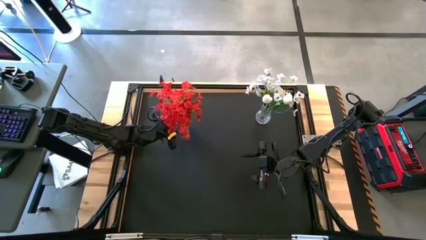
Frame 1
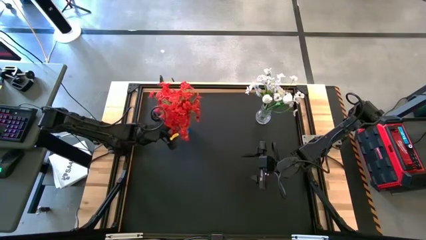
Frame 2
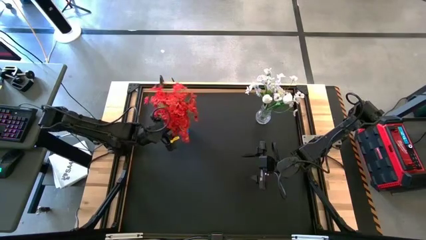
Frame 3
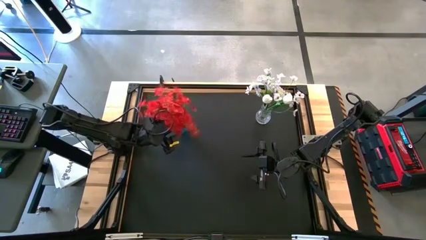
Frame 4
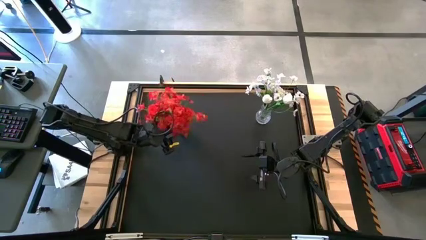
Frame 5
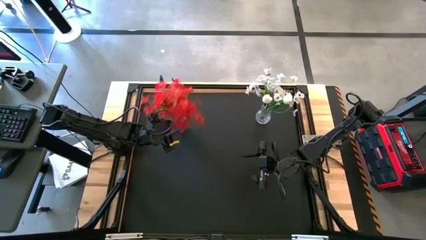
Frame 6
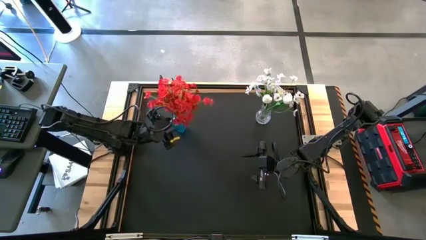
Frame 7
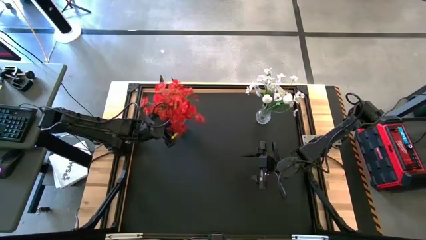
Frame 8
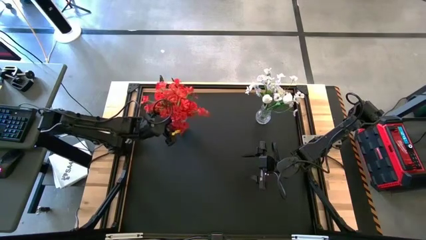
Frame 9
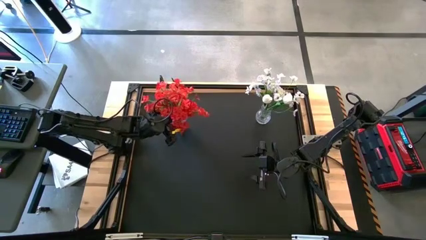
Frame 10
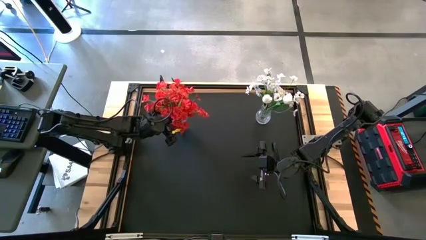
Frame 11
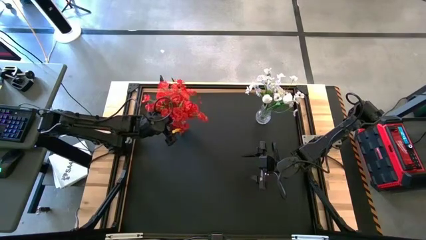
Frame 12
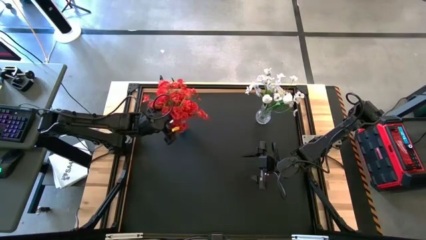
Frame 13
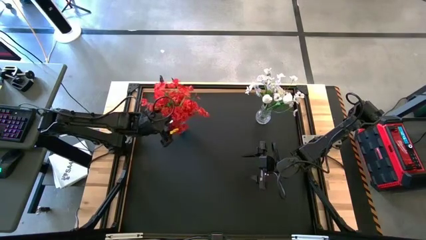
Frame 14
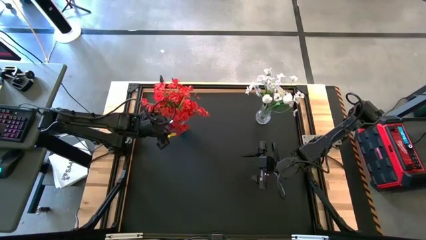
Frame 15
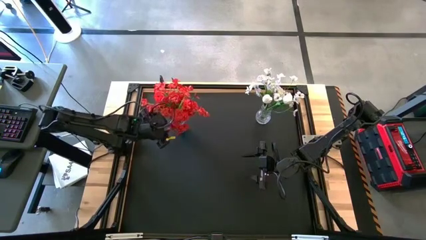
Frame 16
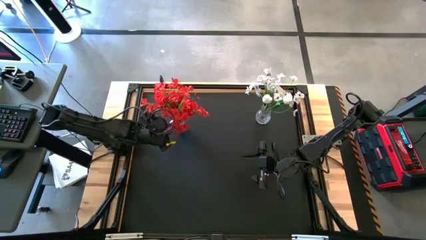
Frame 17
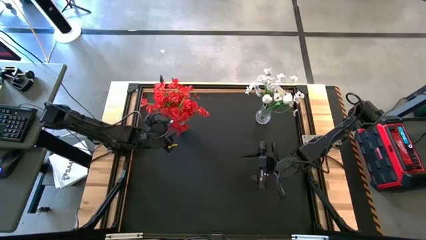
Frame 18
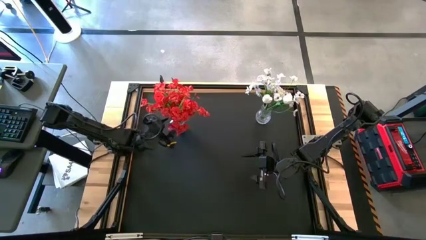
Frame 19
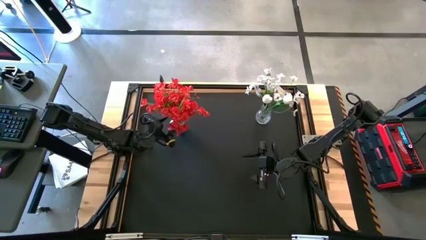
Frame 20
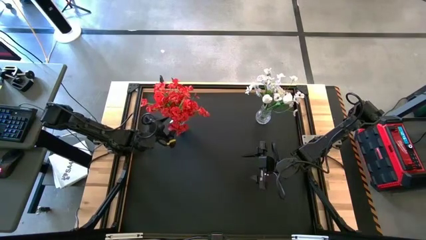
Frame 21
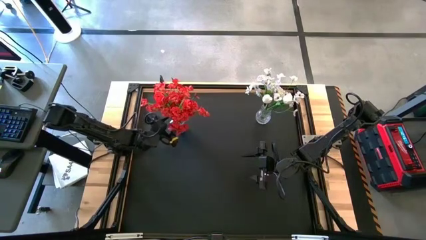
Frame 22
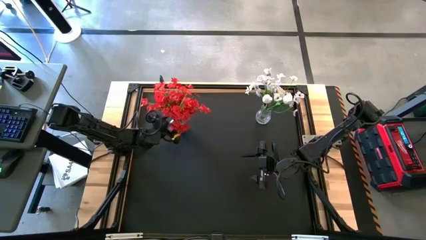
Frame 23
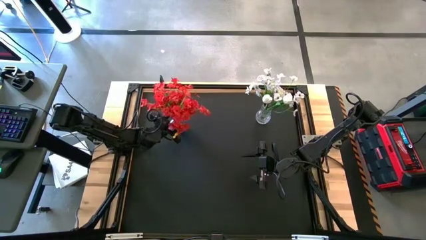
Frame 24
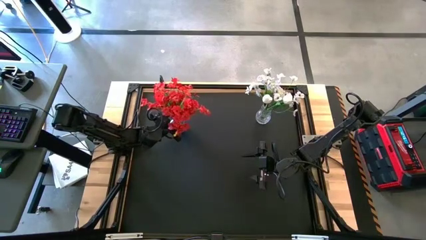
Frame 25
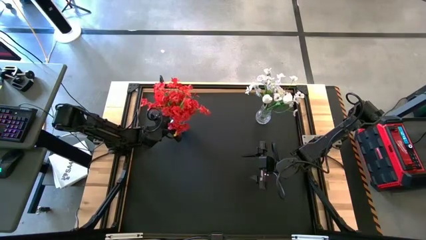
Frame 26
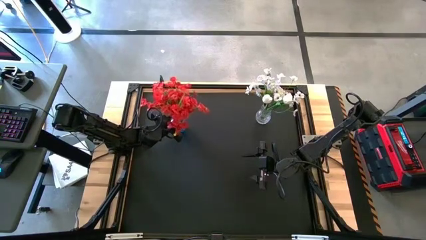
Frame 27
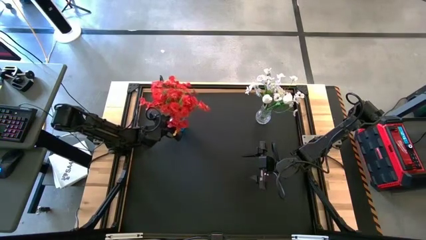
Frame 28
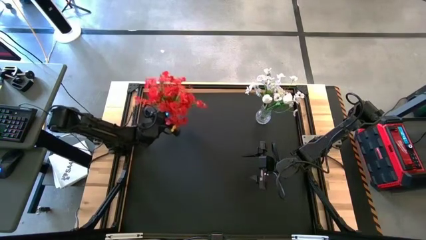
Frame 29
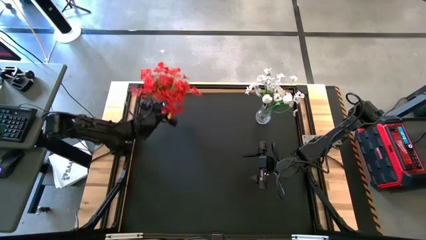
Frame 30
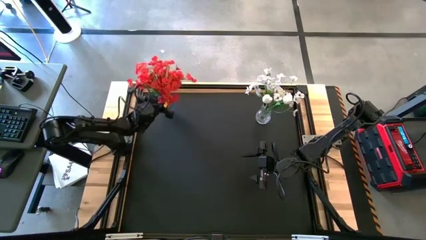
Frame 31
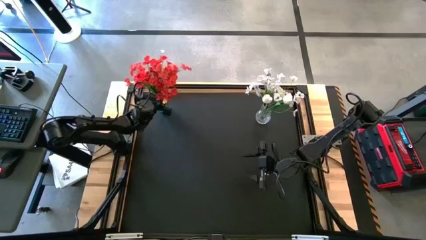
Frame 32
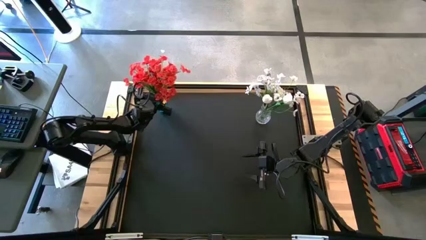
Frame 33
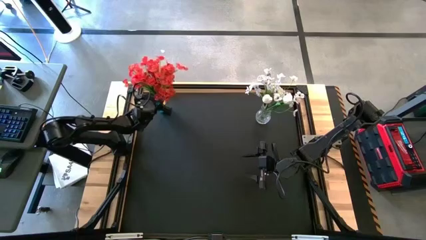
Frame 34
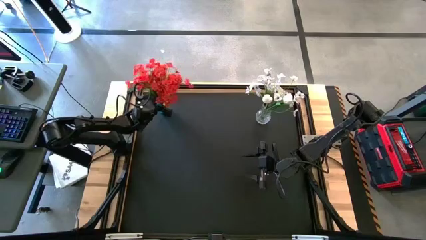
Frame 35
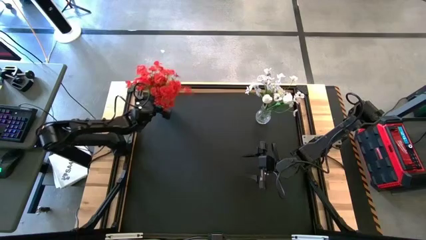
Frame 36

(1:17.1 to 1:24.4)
Task: Sort flowers into vase by color
Move the blue vase to the top left of the table

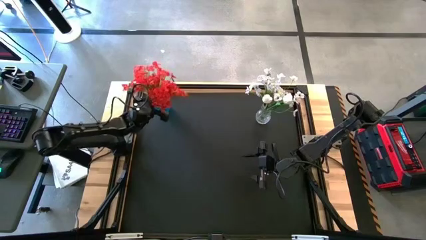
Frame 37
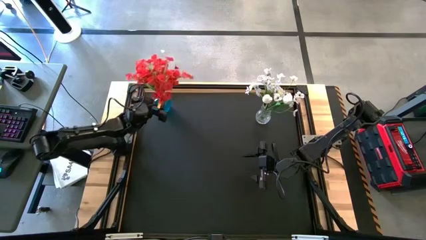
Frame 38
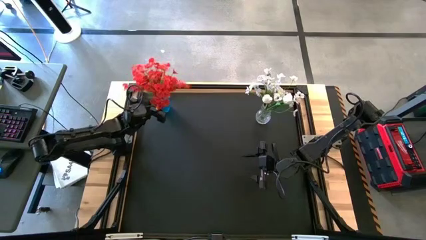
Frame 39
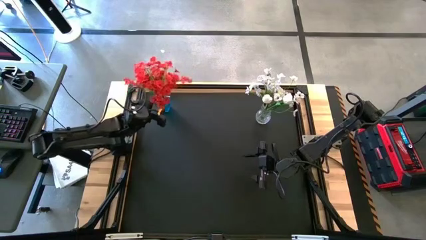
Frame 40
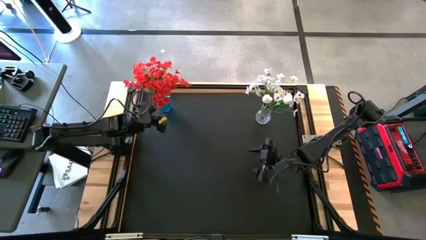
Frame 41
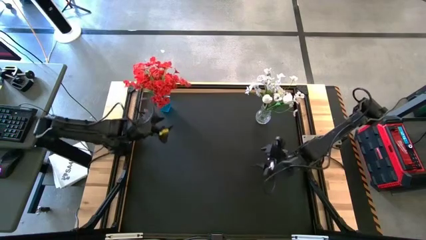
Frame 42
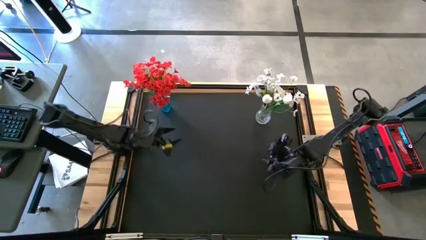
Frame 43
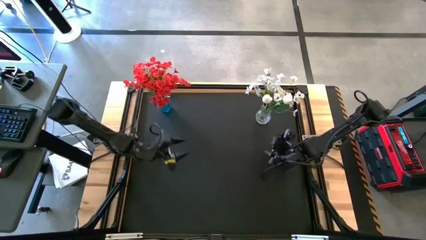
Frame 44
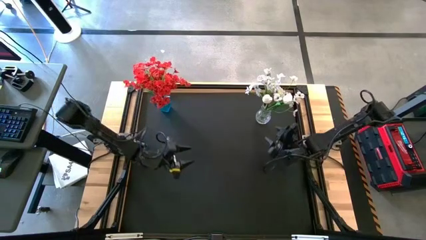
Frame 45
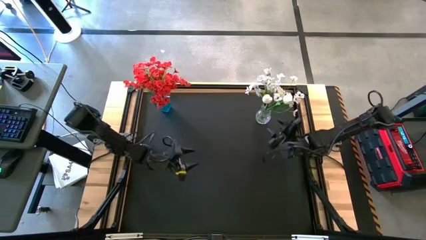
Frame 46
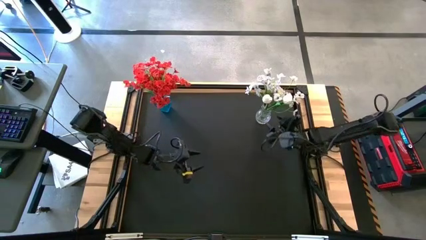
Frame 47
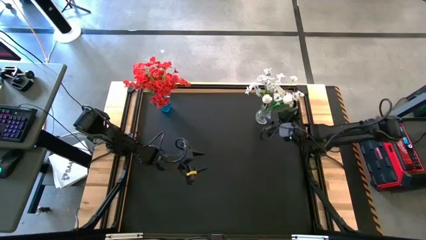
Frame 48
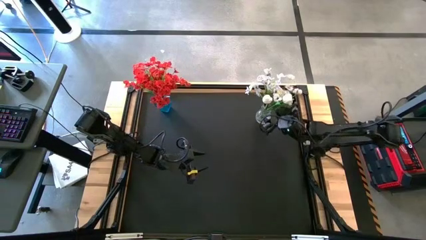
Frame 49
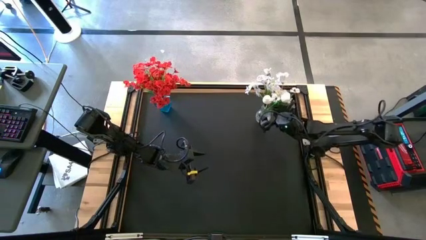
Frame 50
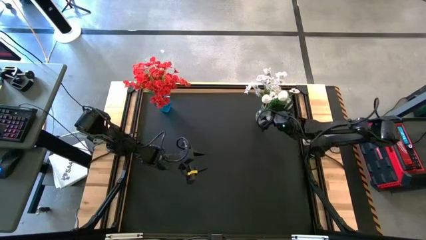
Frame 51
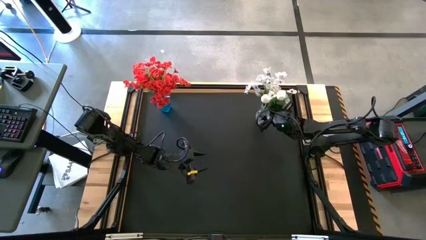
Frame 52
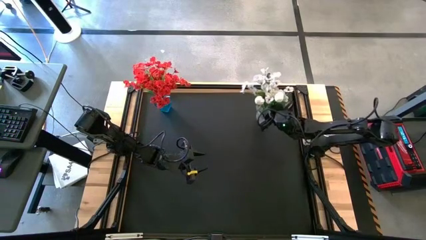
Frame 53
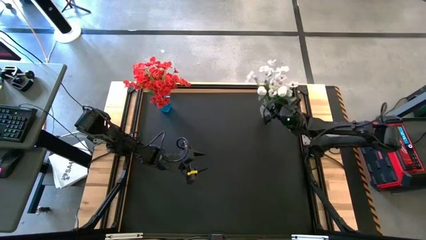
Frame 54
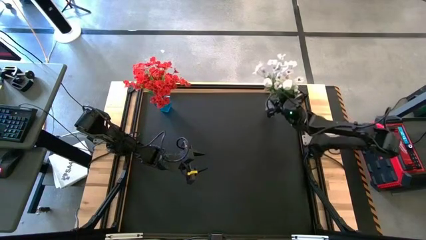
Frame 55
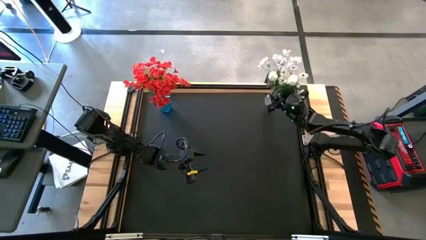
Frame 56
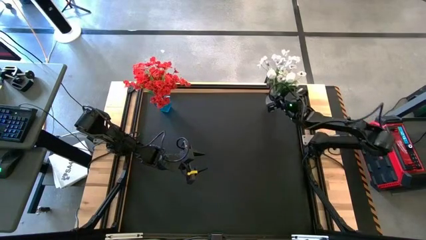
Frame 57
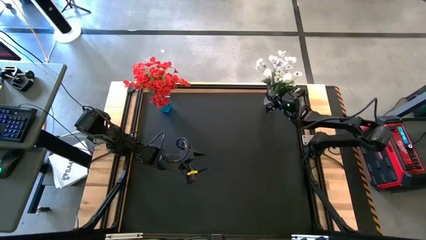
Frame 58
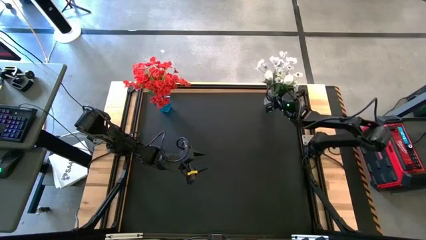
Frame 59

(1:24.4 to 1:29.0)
Move the transparent vase to the top right of the table
